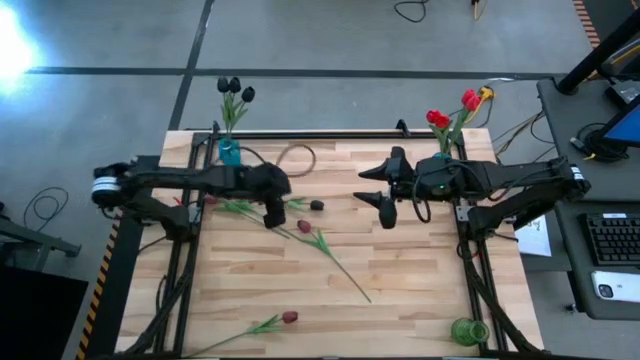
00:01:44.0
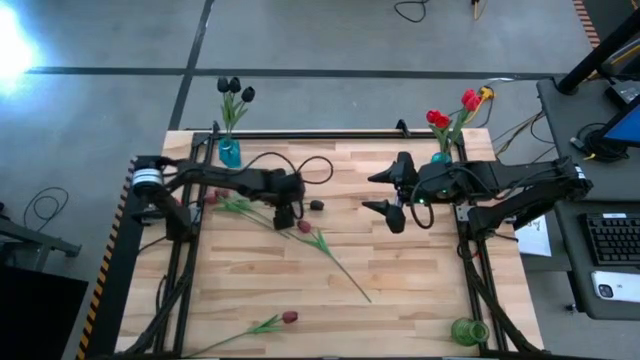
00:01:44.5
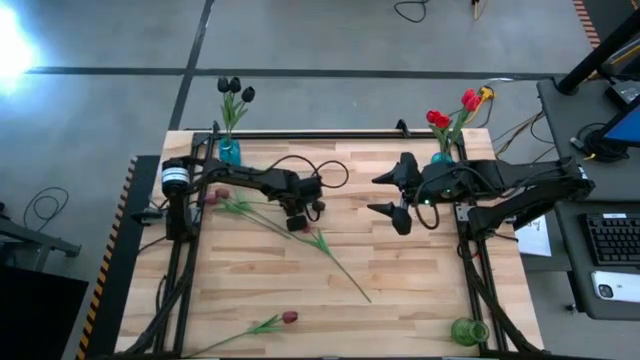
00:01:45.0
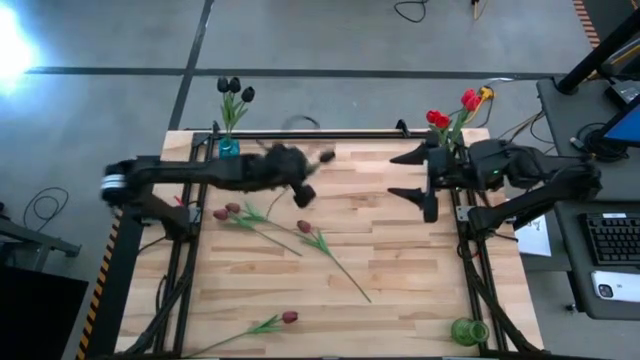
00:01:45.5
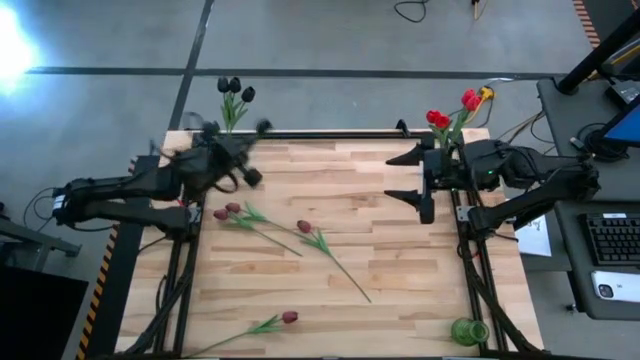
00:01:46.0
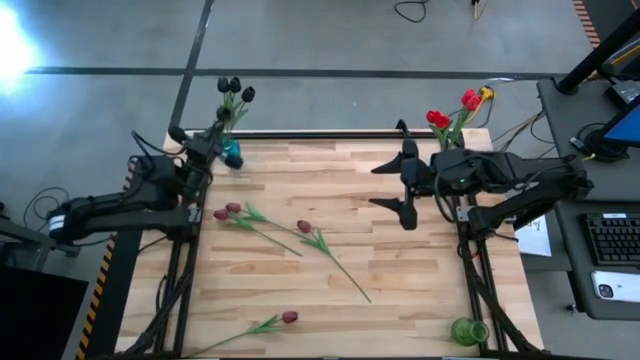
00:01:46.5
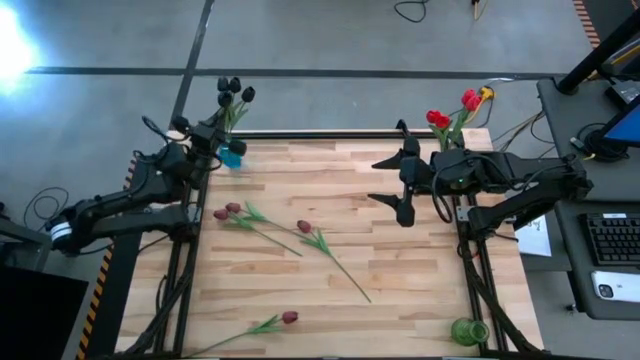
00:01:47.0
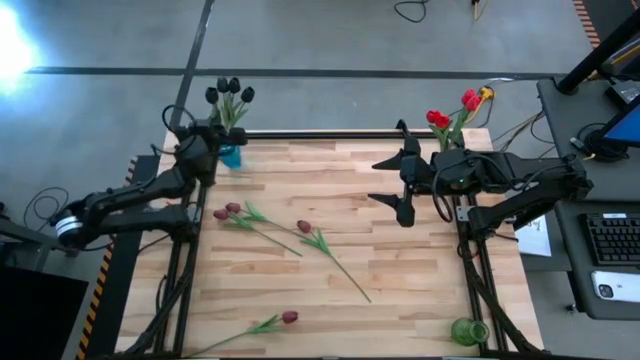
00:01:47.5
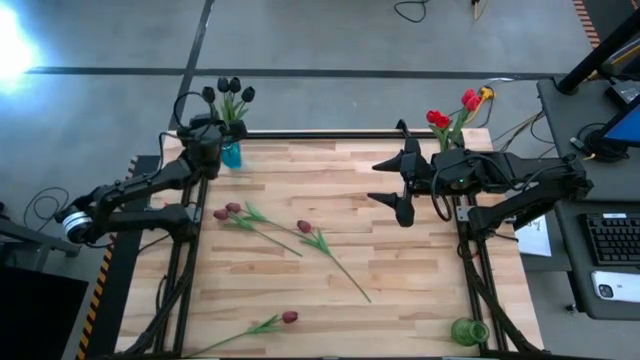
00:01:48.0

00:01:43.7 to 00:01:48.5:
Task: Sort flowers into vase by color
Put the black tulip into the left blue vase

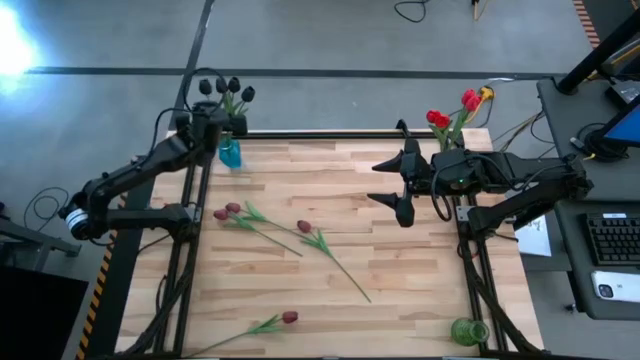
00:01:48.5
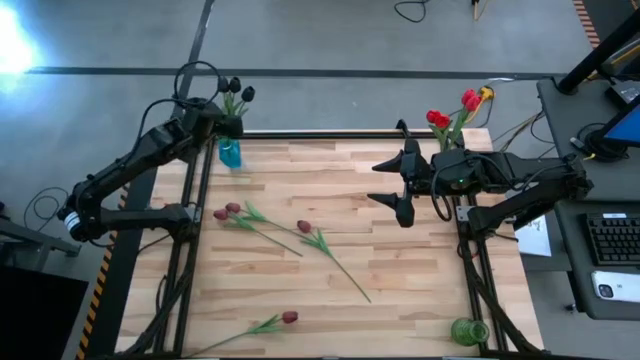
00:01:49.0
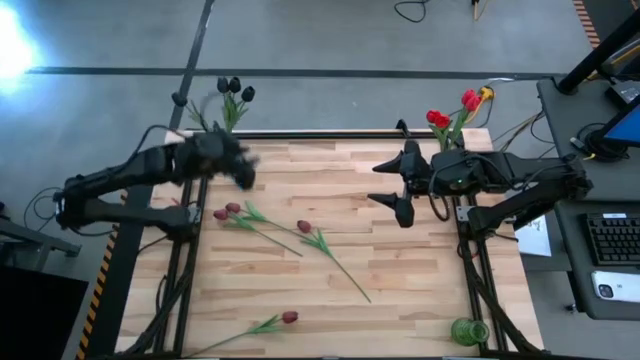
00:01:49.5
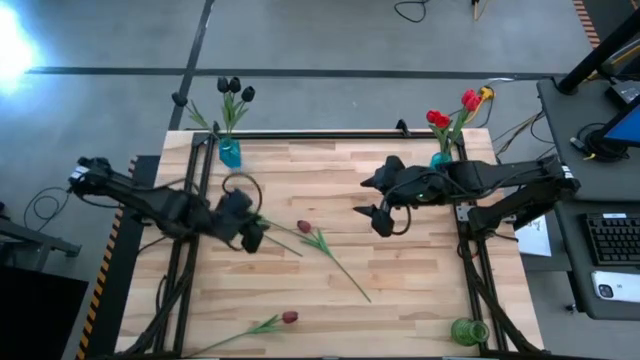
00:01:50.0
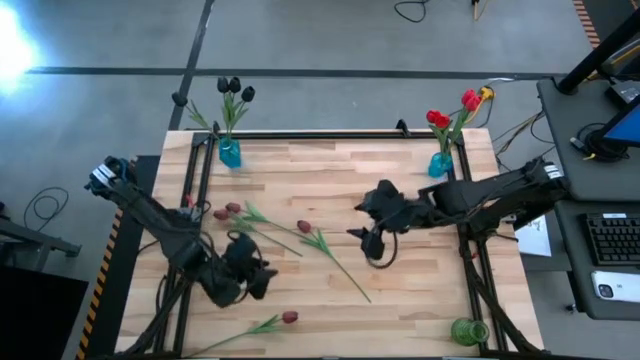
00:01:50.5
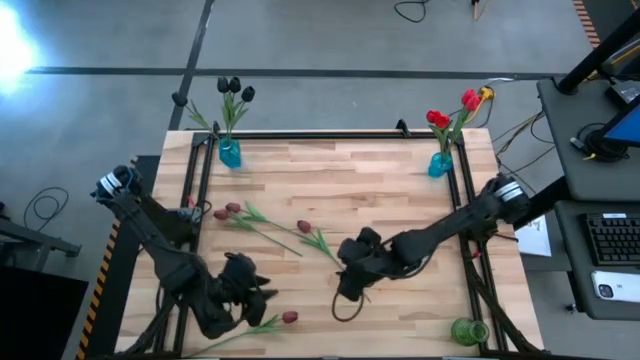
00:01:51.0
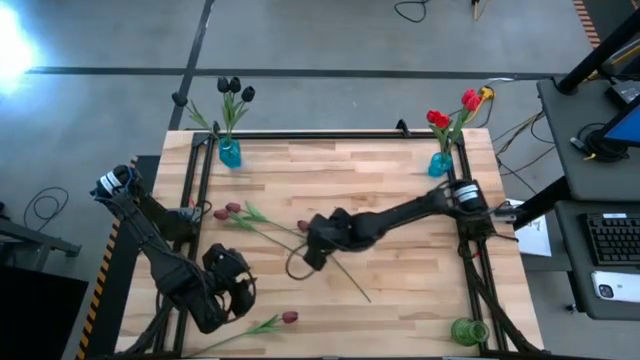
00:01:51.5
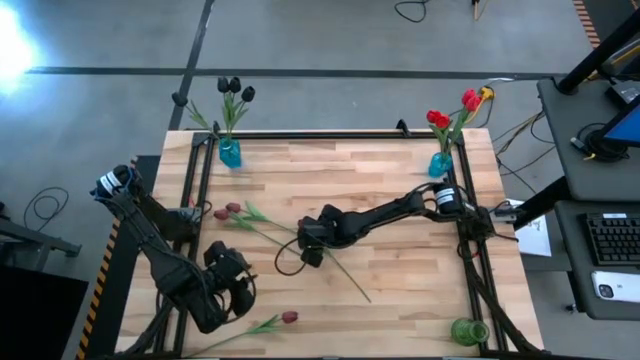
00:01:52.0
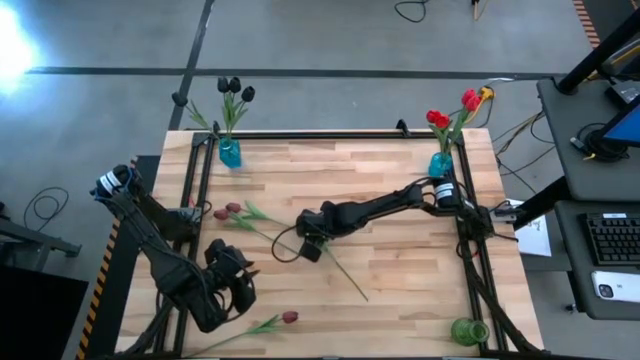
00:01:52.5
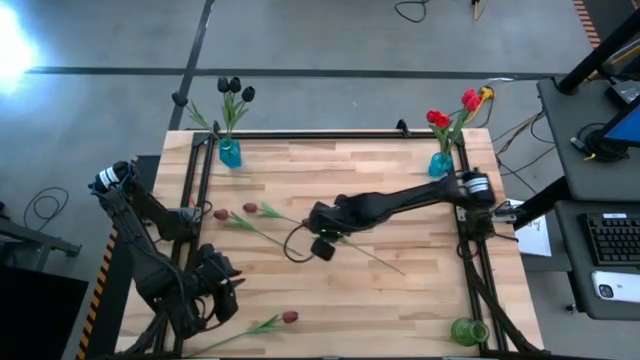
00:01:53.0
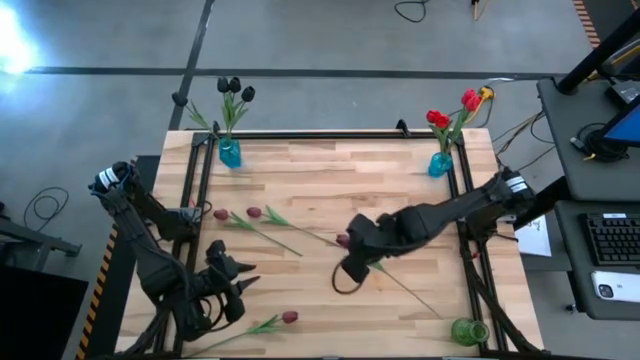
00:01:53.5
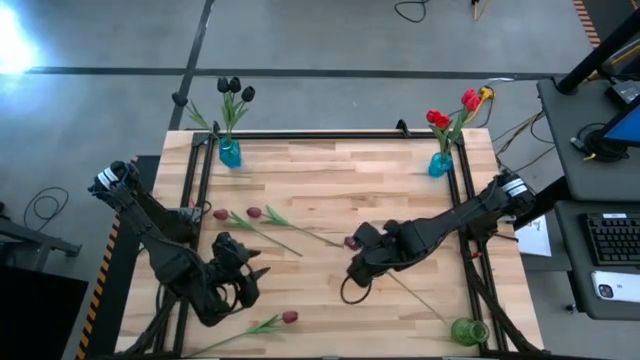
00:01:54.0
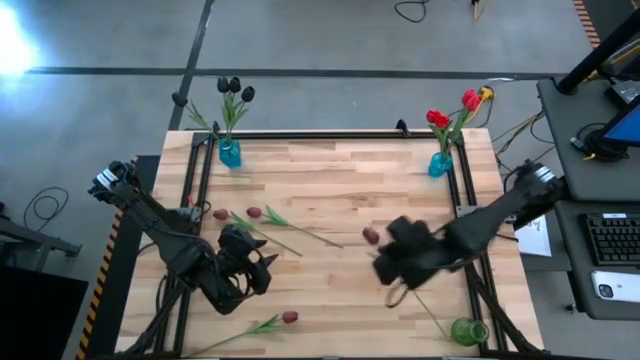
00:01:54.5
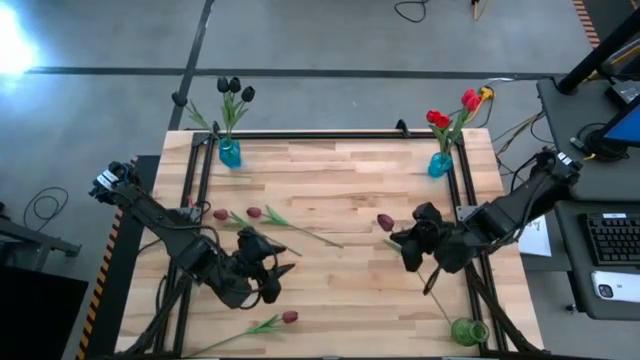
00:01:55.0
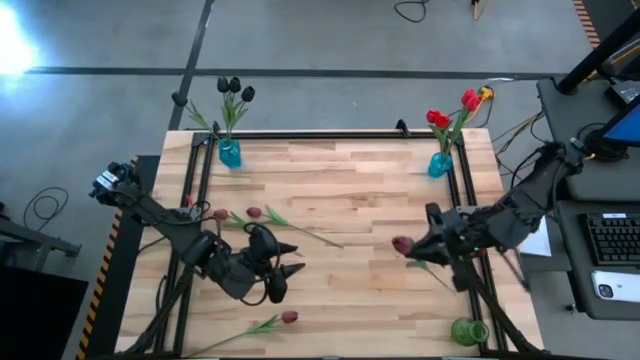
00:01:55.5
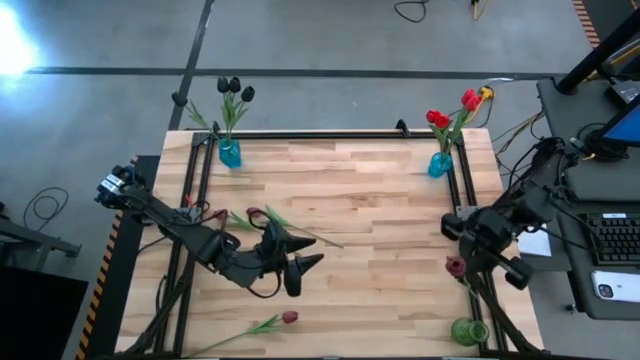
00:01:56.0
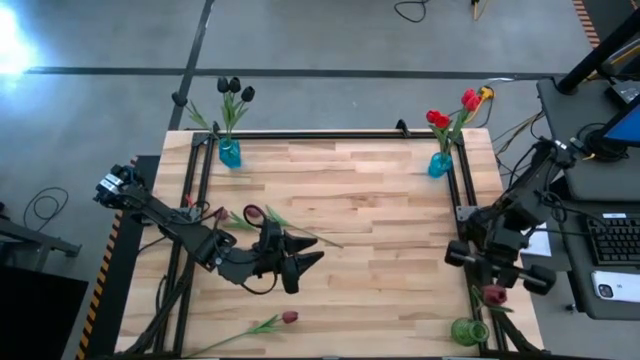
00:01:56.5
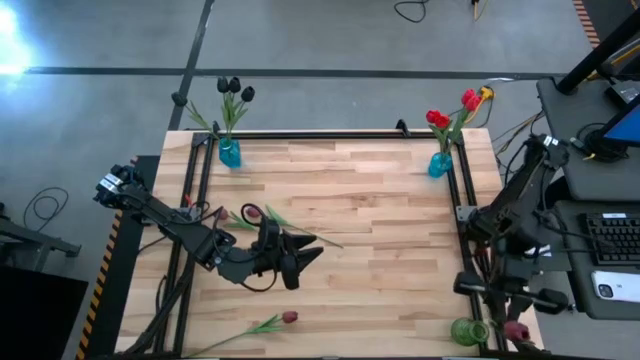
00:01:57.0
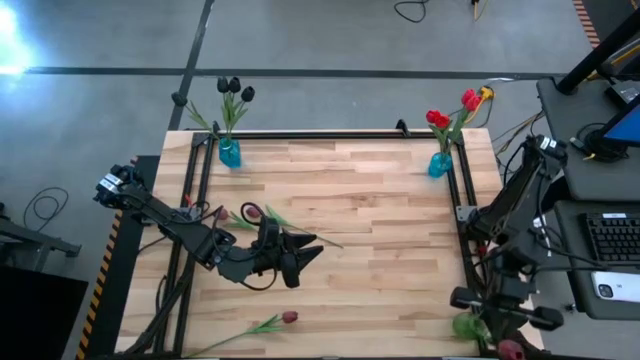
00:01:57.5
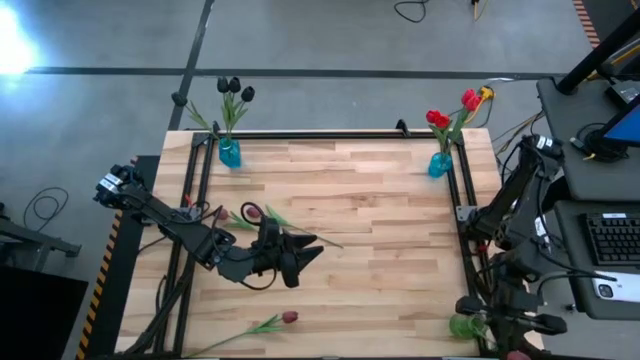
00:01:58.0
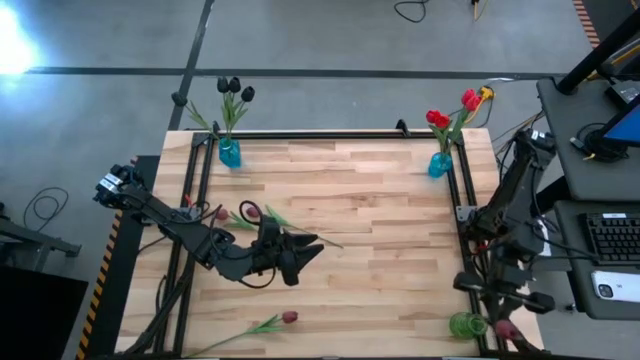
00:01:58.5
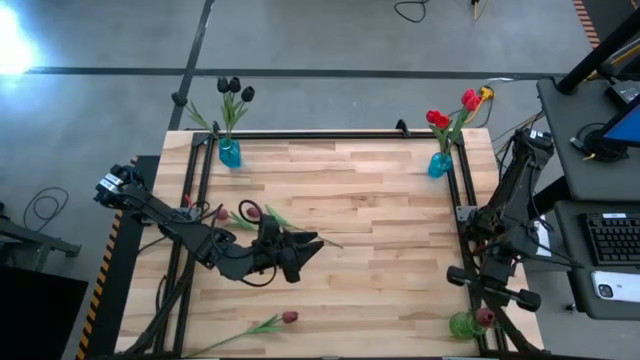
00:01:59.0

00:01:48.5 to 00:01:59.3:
Put the dark red tulip into the green vase

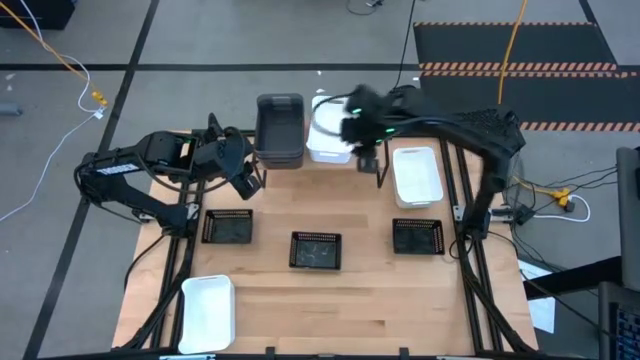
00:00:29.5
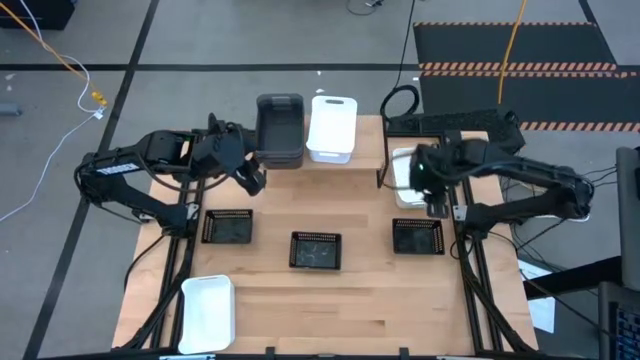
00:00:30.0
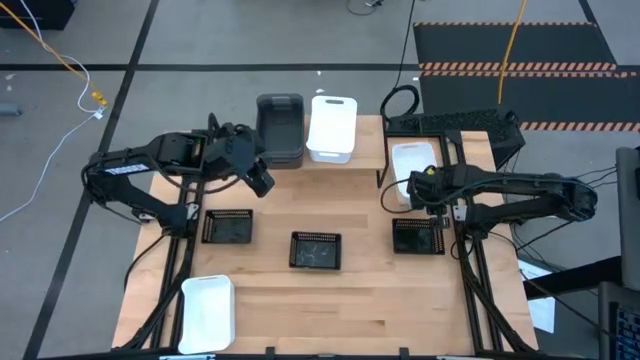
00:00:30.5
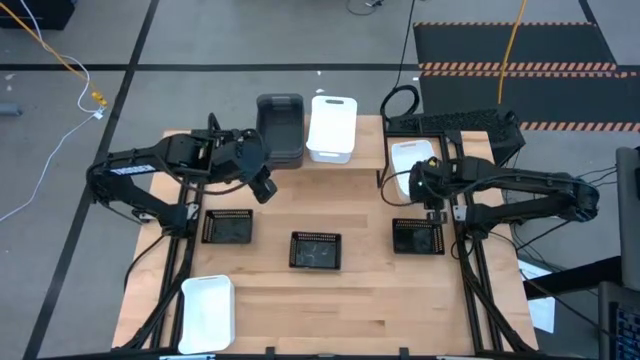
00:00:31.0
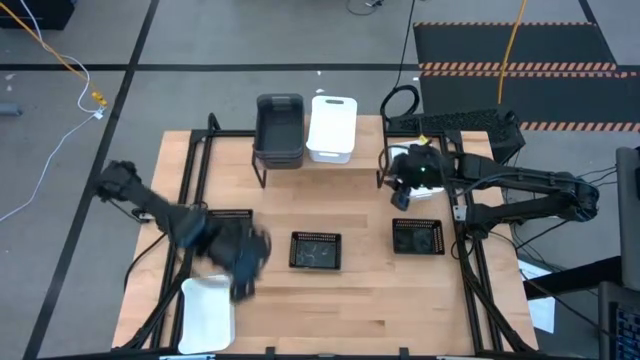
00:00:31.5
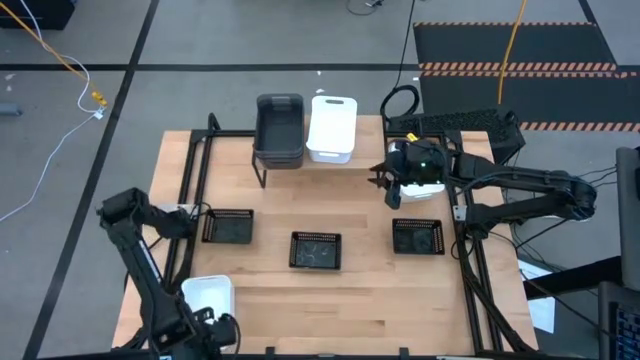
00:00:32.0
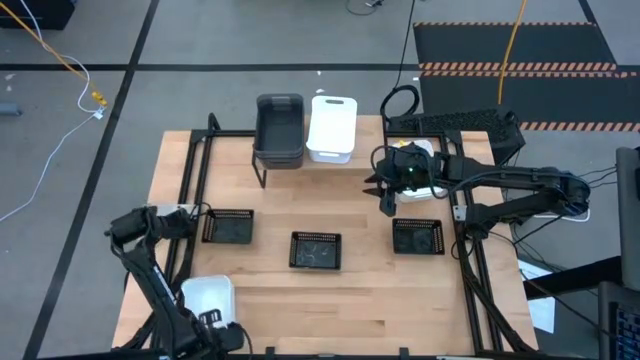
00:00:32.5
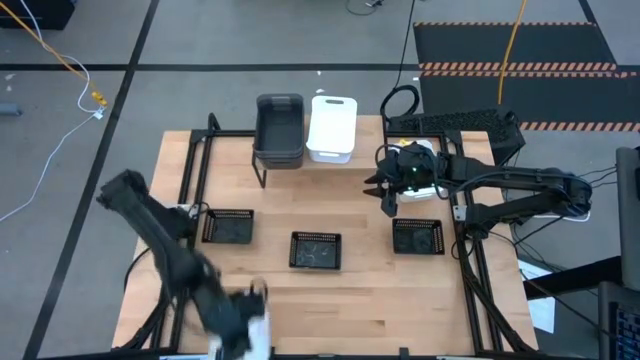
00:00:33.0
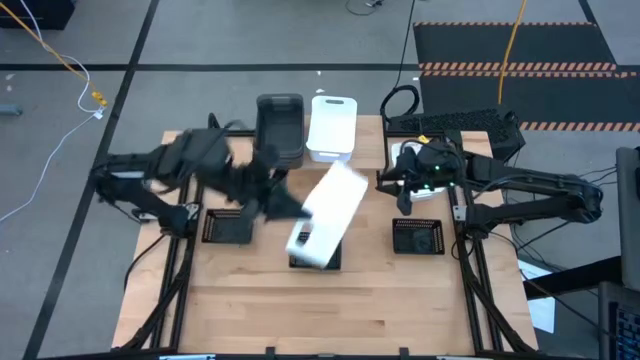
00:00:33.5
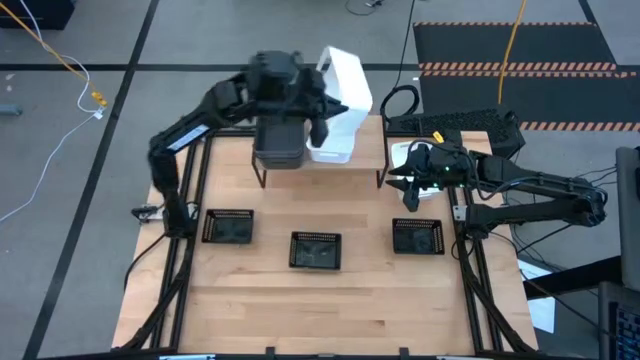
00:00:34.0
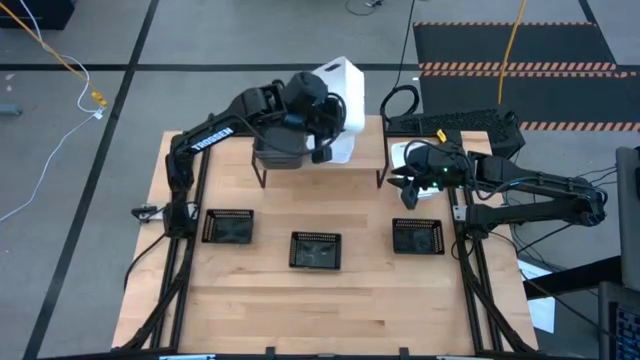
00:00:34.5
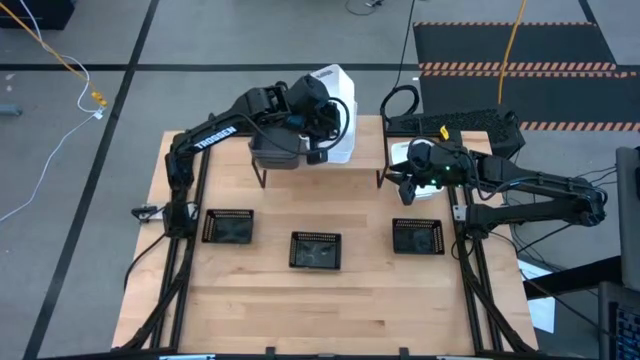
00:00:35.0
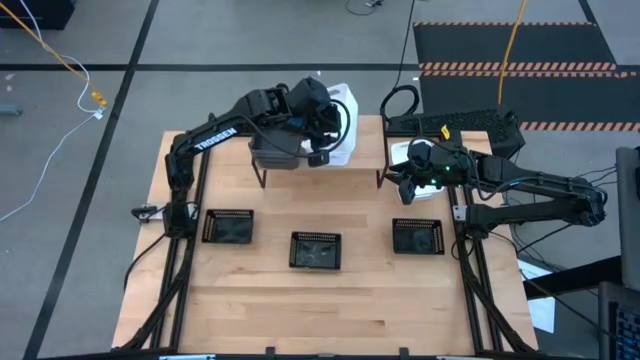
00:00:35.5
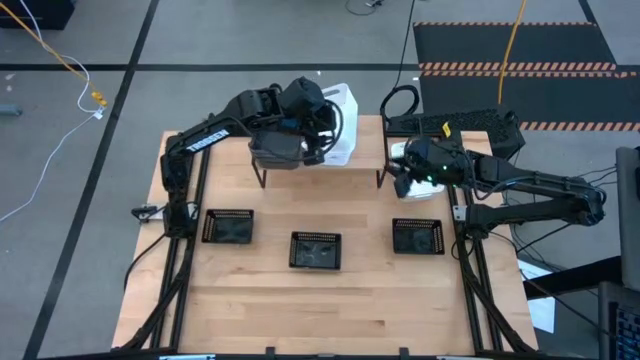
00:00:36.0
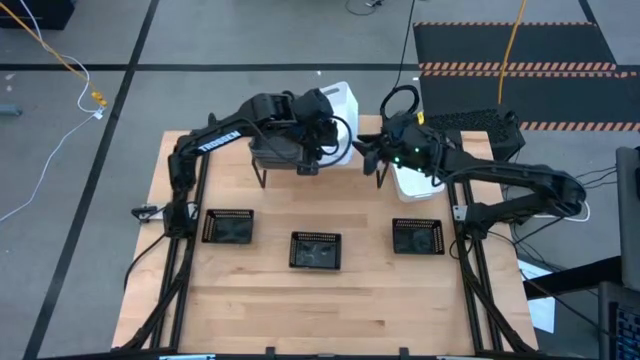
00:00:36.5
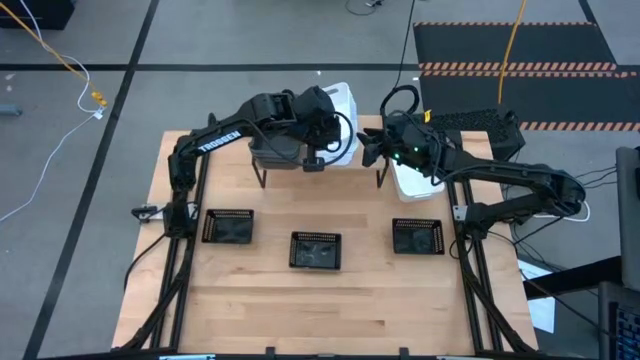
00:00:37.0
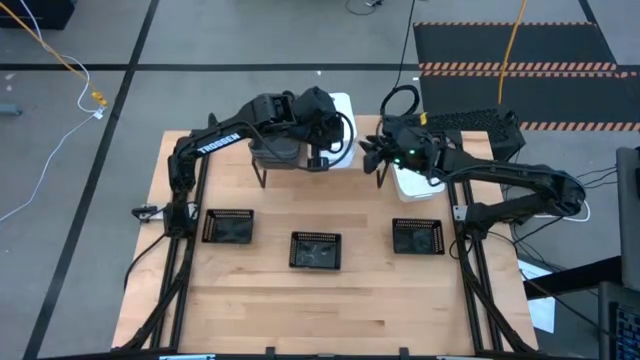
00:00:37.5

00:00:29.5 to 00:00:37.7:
Task: Stack baskets on shelf by color
Stack the bottom white bin on the other white bin on the shelf
